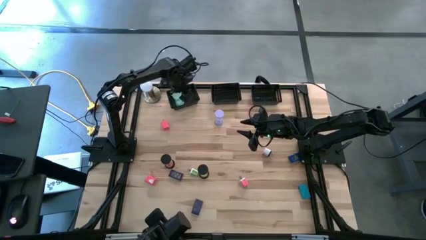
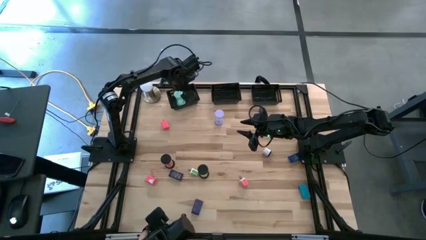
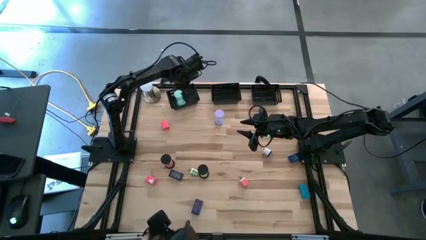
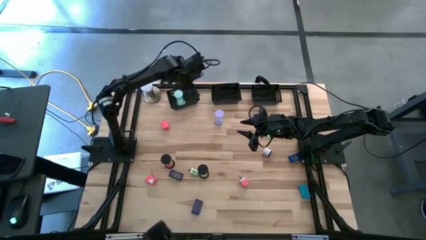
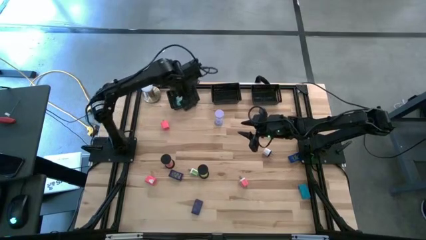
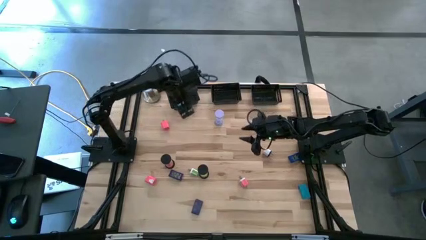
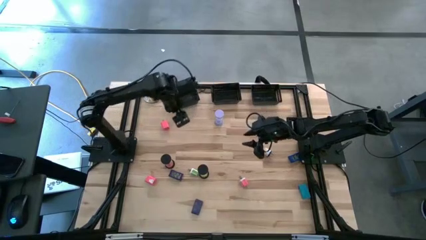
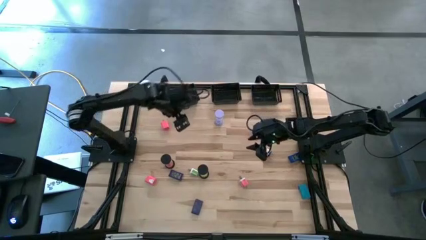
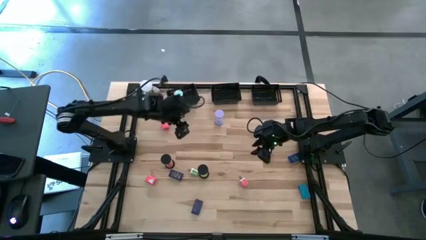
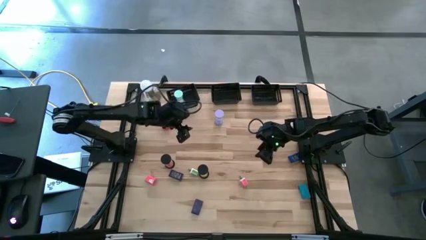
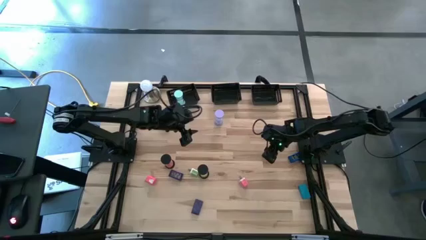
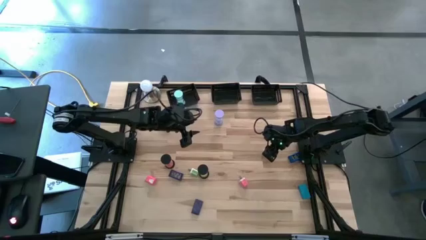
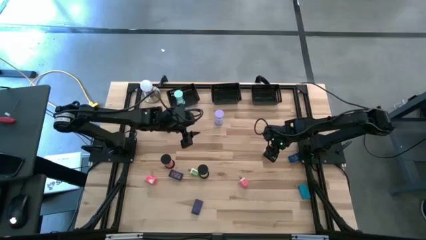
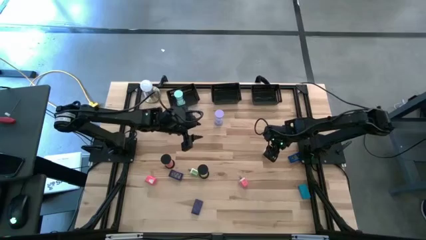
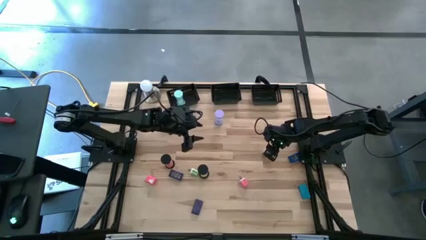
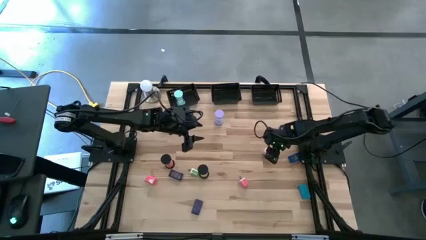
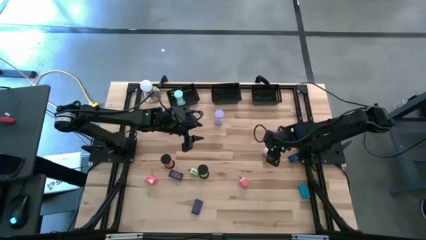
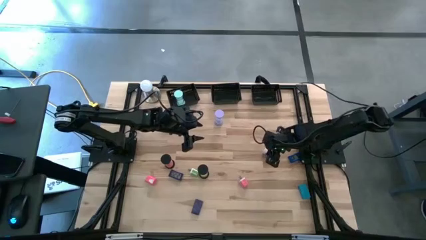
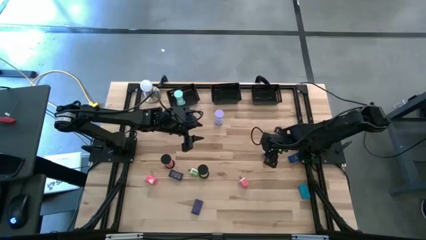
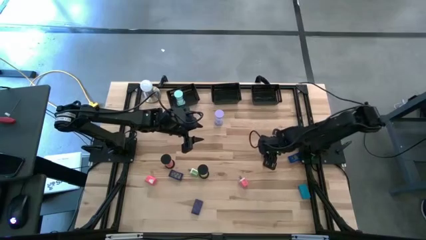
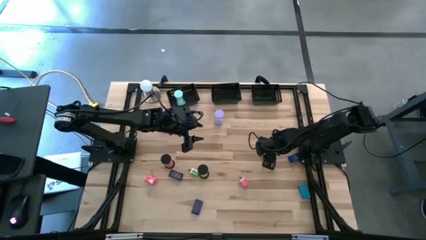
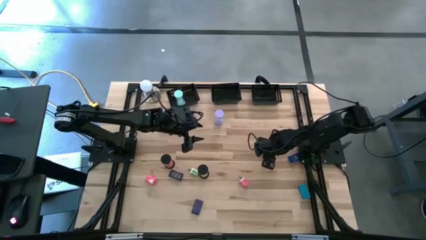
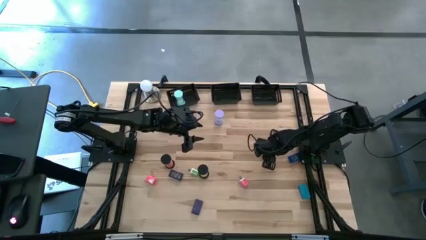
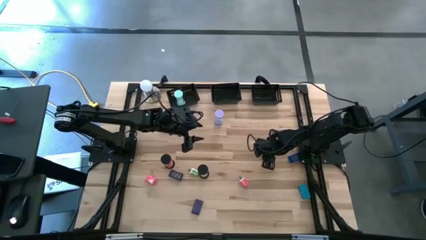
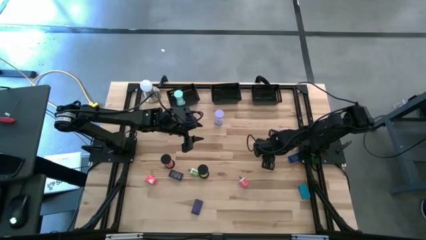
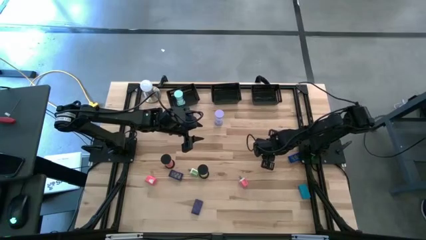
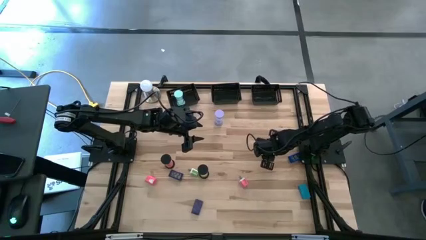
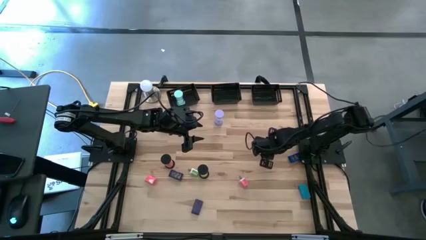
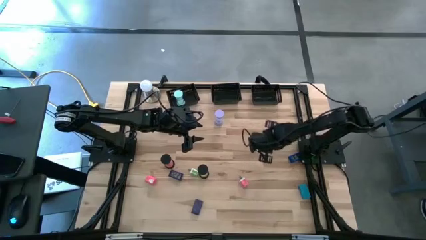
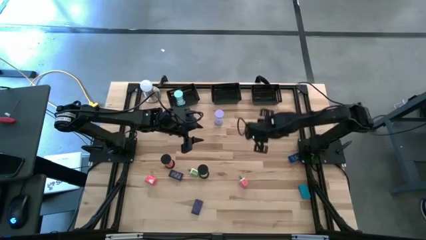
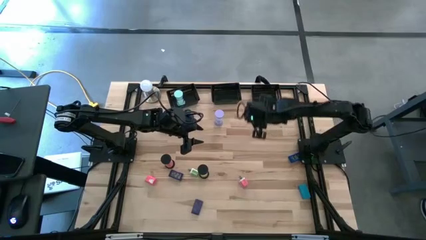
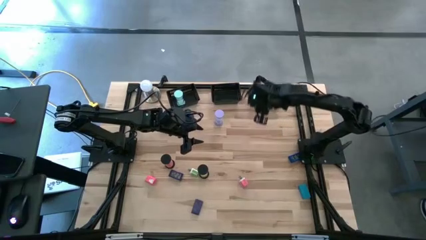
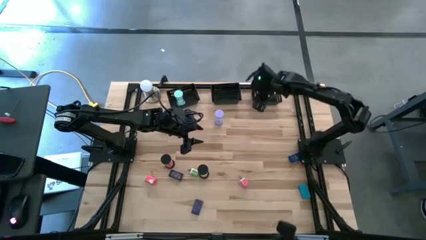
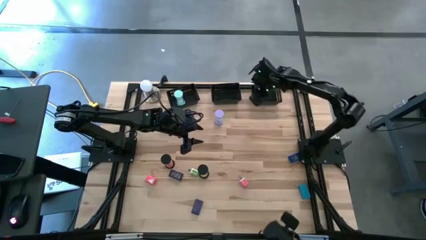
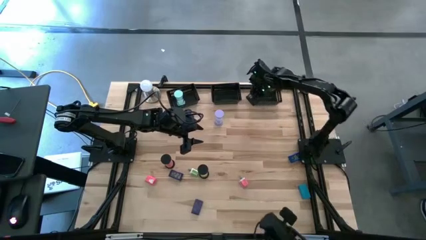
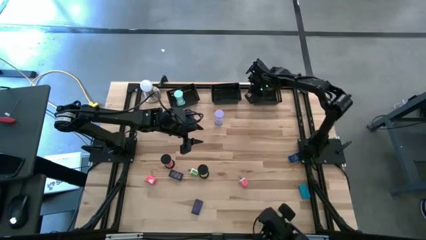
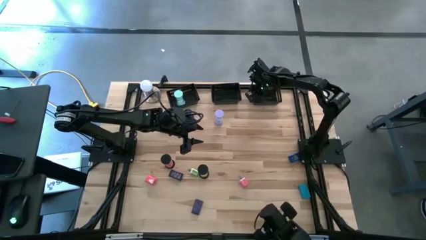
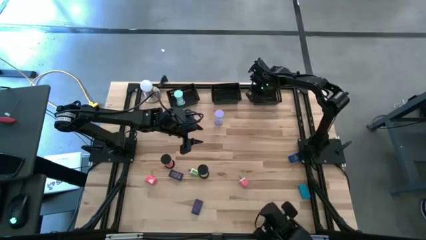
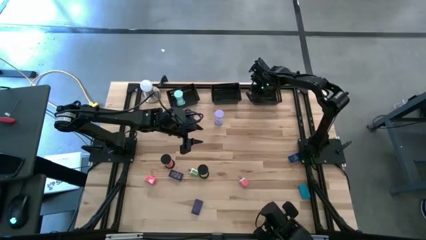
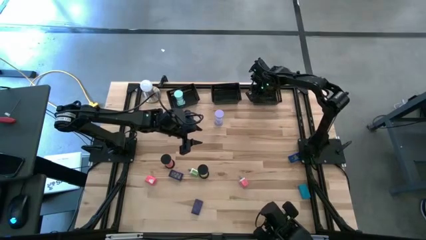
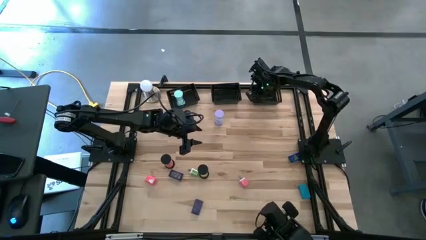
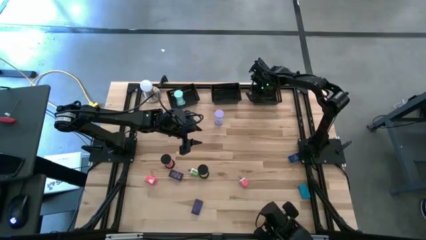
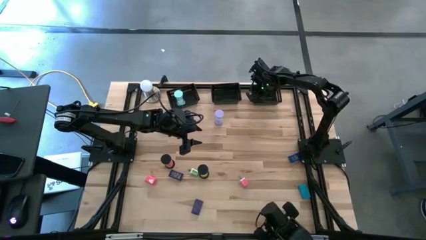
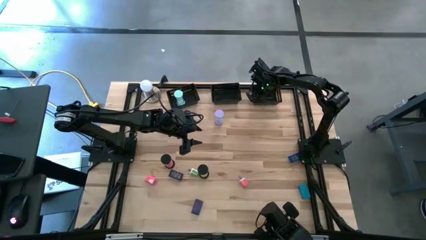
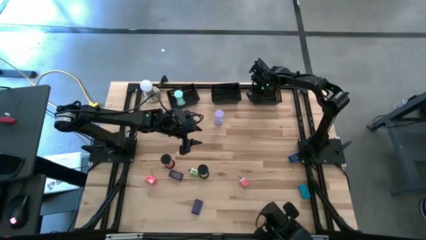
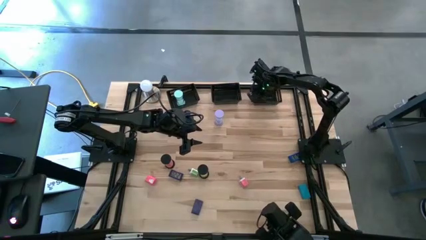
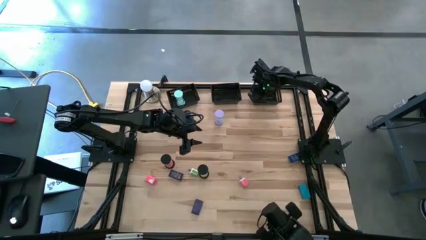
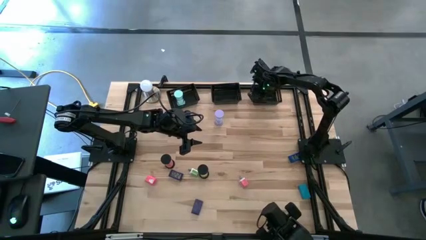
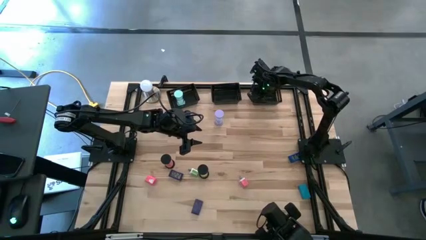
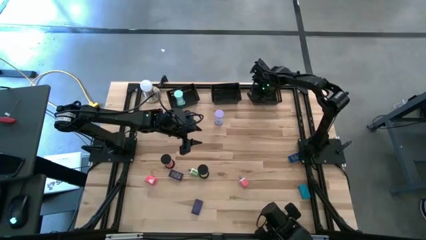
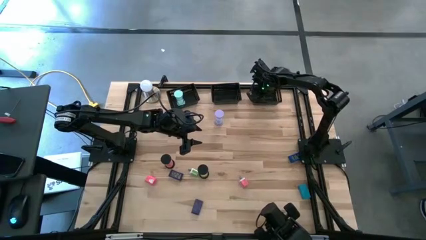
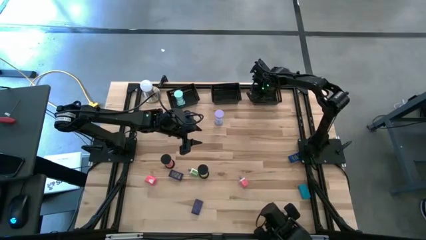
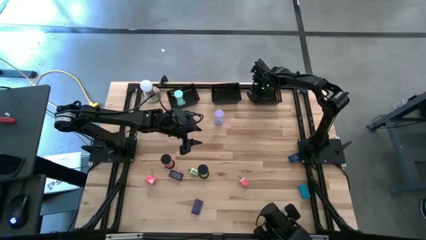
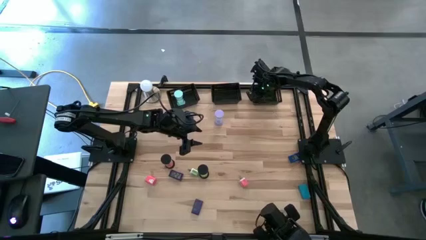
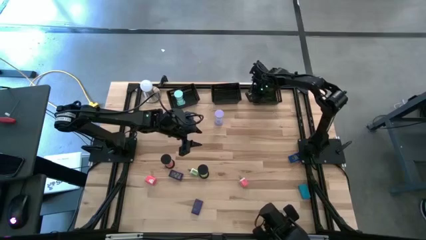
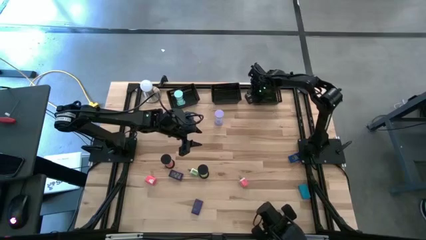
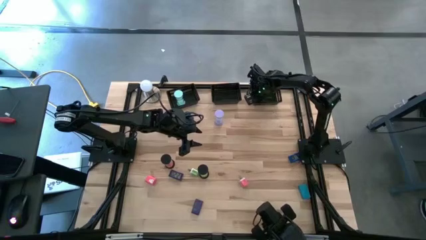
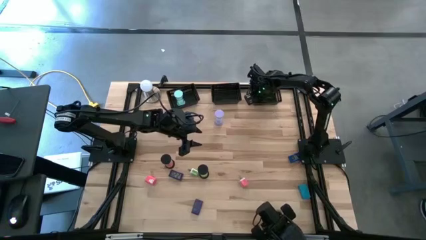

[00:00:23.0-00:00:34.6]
Task: Pick & Place Office items
Put the white charger adapter into the right black bin
